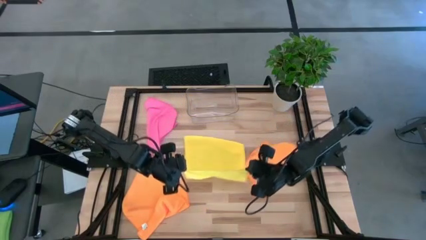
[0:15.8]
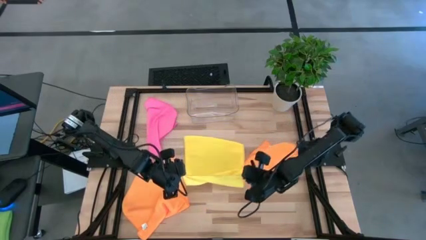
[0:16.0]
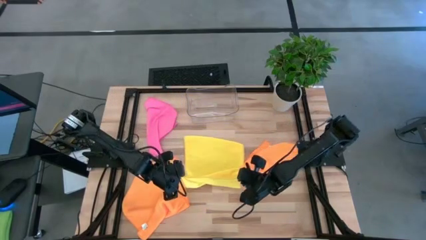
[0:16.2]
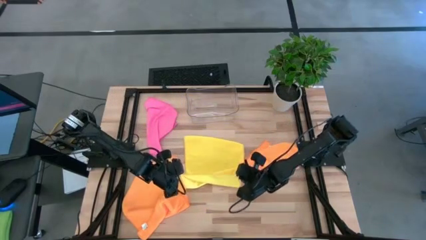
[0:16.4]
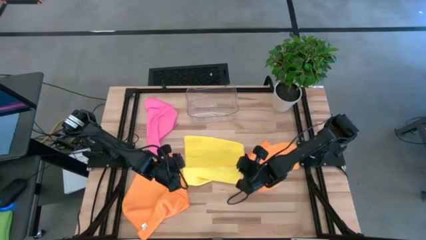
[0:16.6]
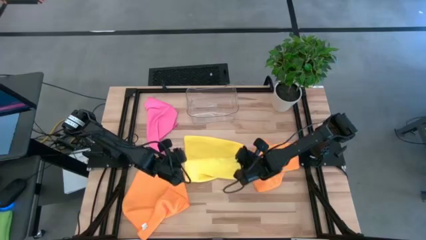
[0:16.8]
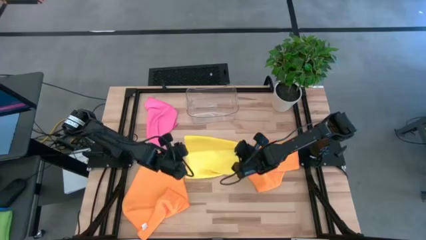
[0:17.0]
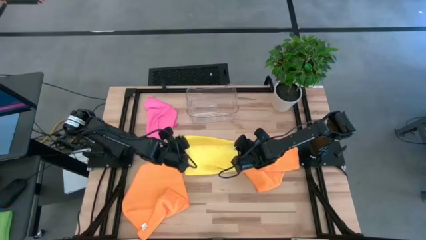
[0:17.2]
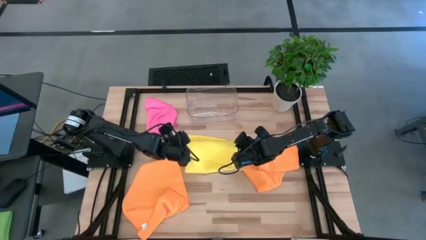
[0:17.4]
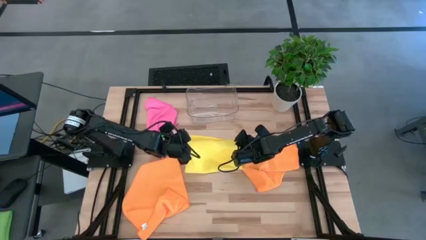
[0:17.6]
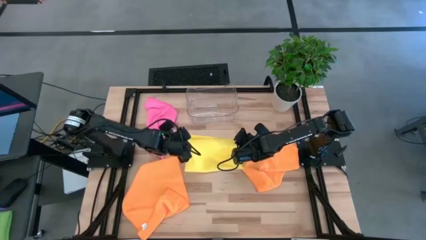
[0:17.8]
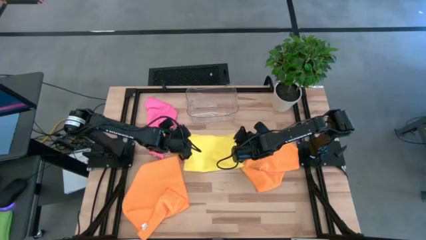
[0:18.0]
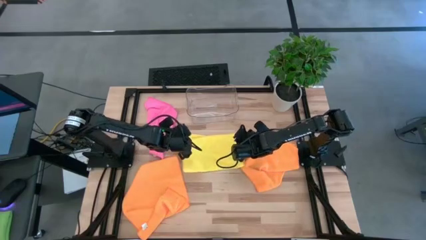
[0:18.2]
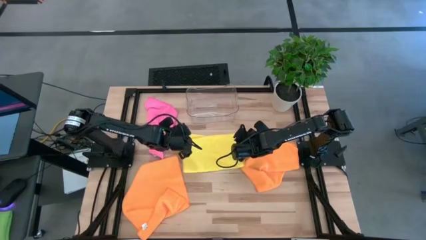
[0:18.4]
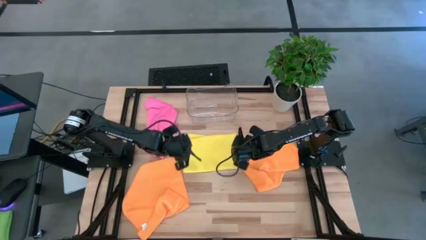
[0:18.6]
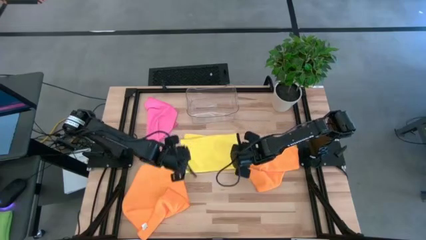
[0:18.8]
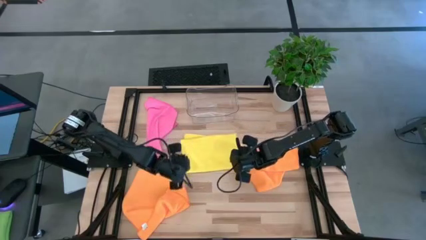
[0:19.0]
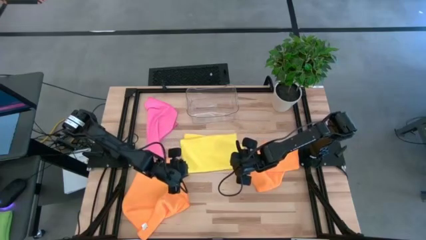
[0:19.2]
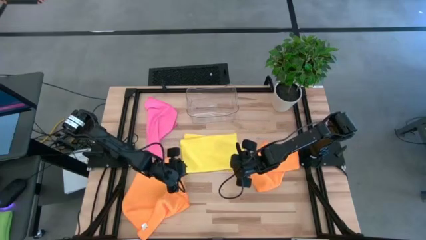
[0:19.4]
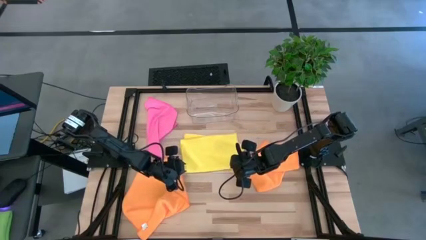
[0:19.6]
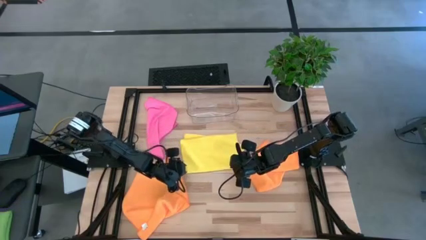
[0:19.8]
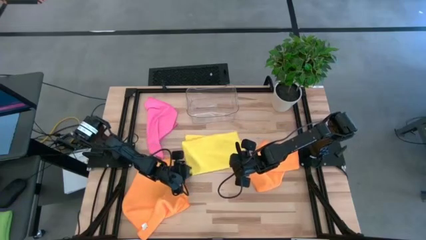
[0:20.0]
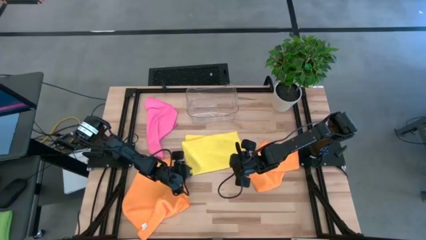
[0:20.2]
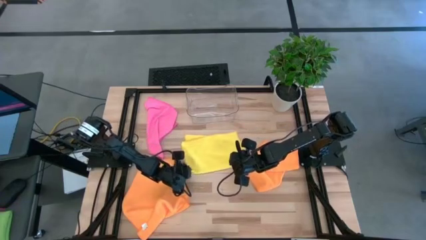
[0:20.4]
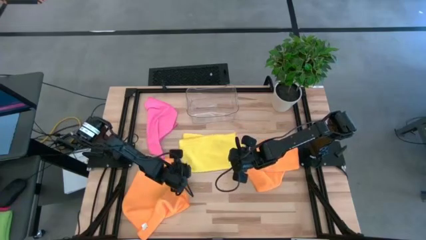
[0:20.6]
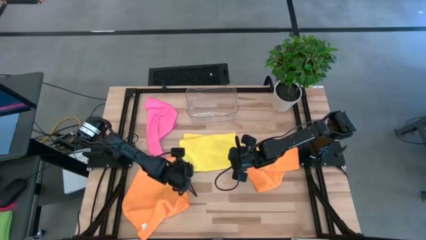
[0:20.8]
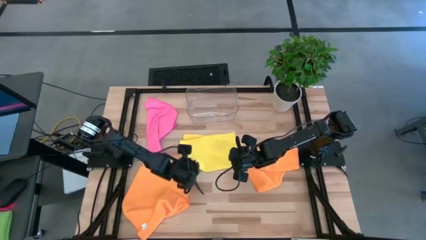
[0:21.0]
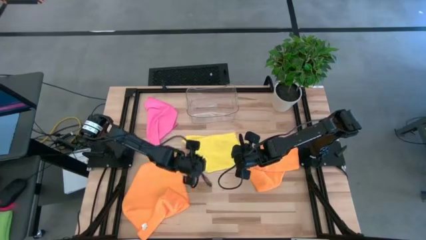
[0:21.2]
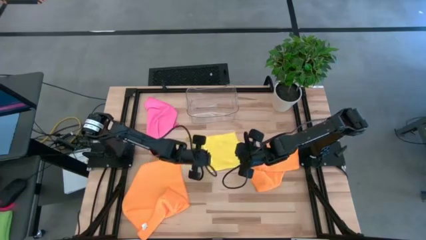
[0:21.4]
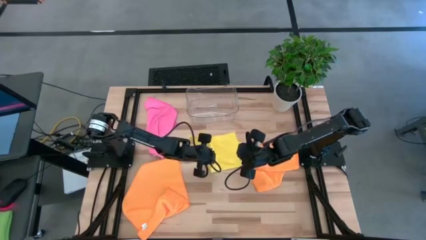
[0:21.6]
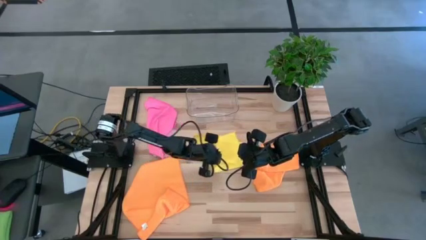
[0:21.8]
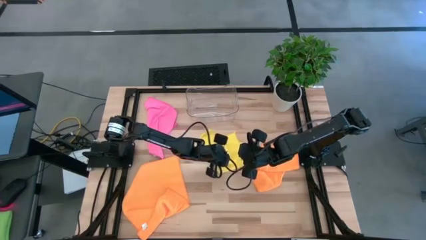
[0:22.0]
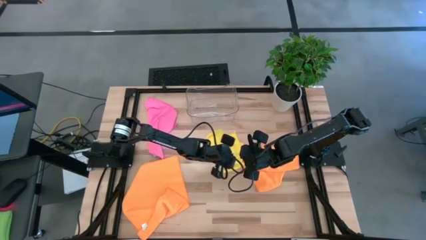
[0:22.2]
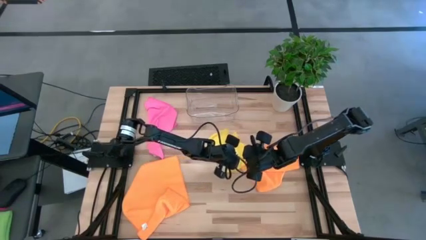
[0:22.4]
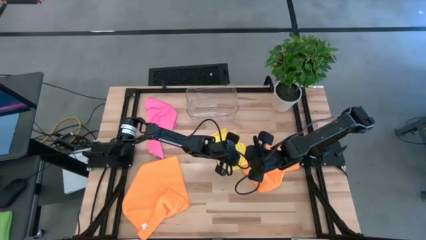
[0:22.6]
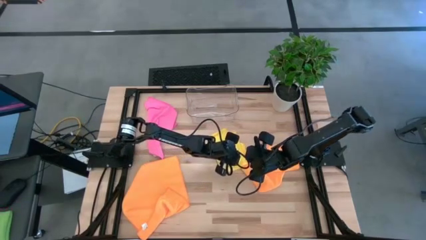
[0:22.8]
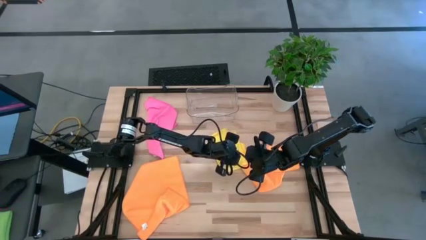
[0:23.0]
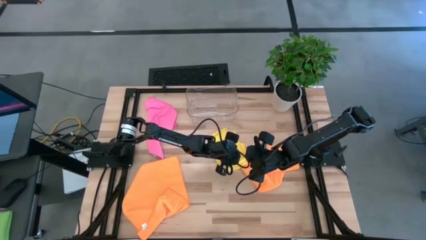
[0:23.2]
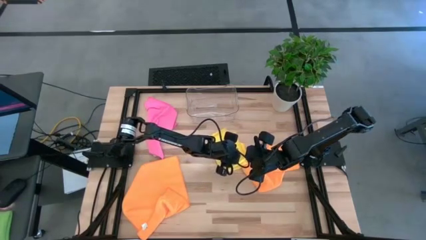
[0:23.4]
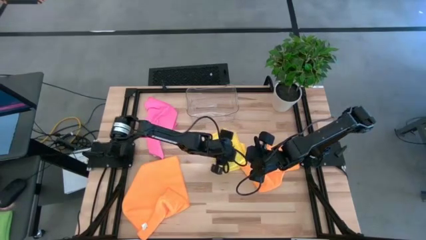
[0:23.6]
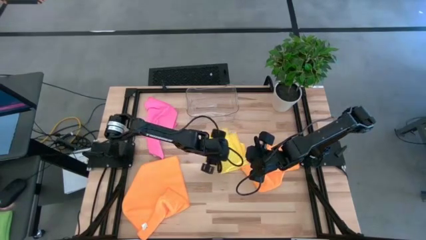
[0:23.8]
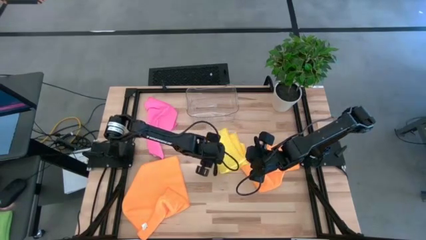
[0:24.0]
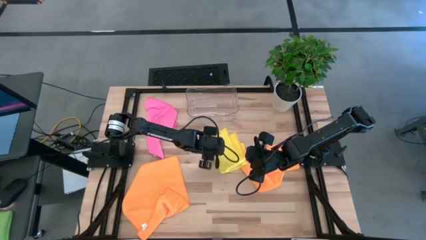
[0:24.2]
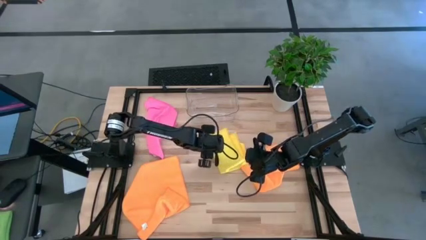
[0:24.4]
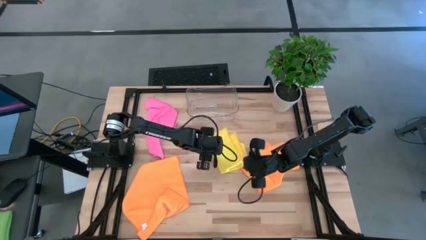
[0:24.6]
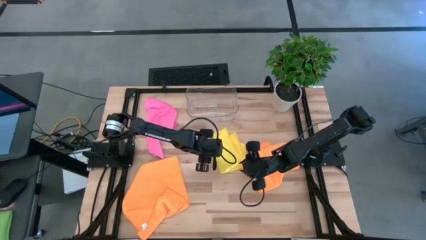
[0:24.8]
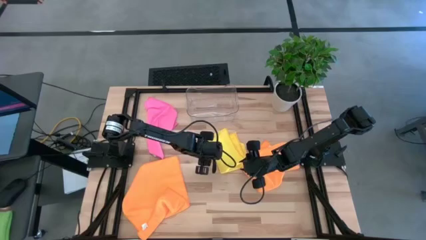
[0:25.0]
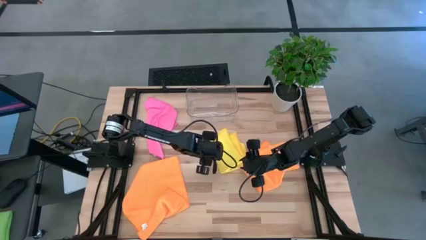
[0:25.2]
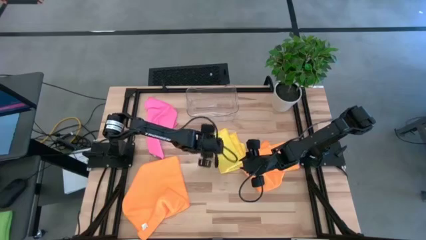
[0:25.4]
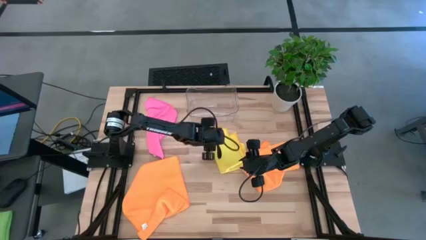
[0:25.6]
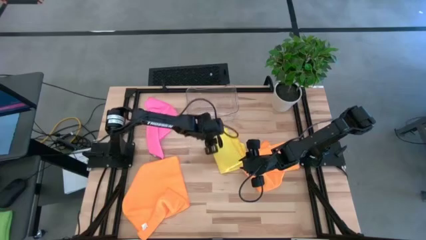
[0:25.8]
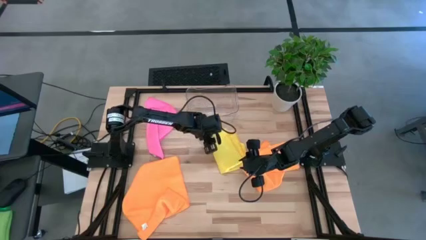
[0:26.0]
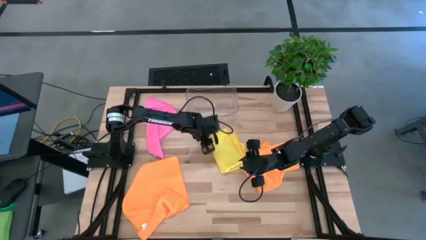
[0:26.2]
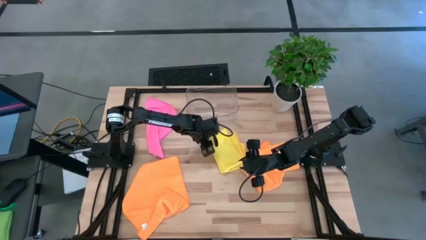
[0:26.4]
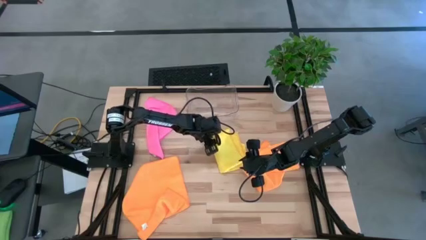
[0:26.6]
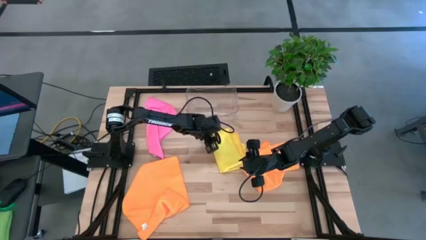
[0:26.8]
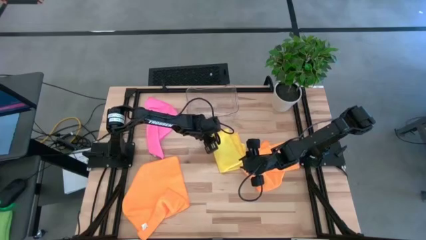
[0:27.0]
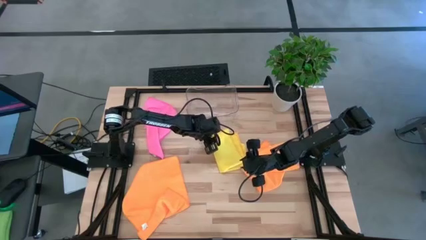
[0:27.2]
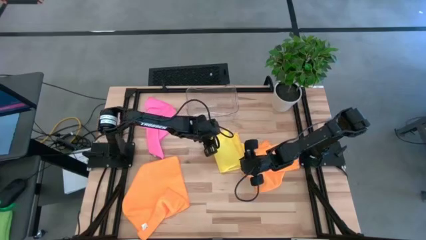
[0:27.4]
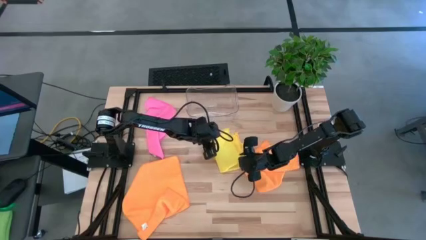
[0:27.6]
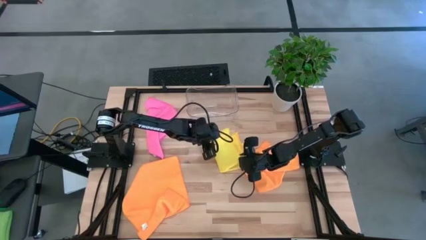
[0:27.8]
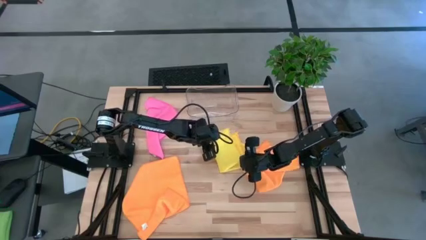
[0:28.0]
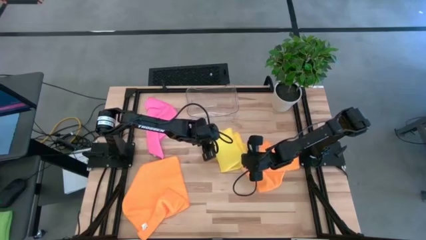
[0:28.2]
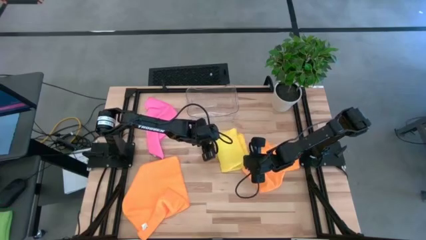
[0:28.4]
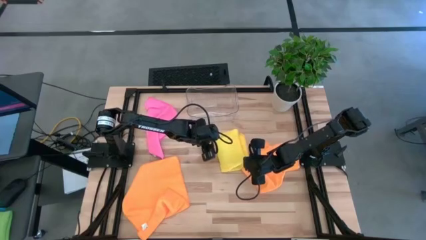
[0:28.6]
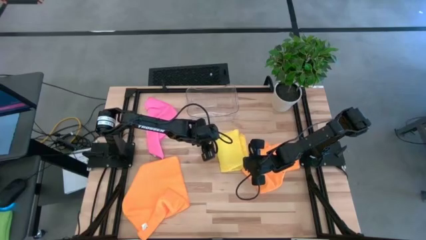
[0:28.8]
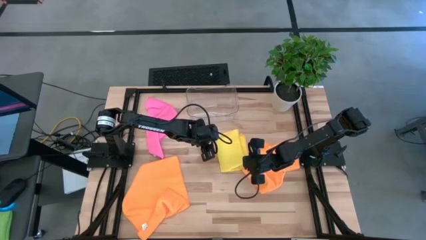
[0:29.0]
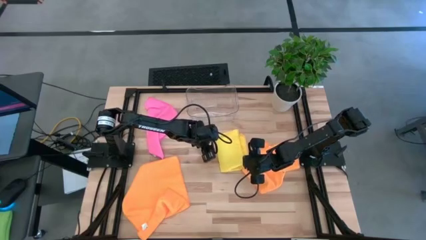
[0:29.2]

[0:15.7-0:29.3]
Task: Fold microfiber towels
Fold the yellow towel

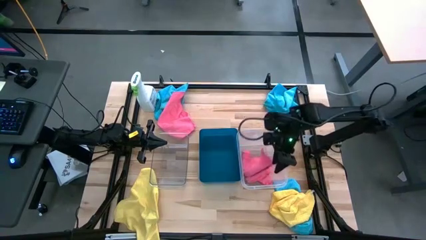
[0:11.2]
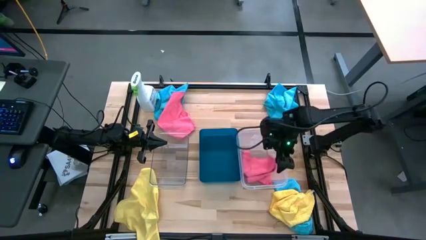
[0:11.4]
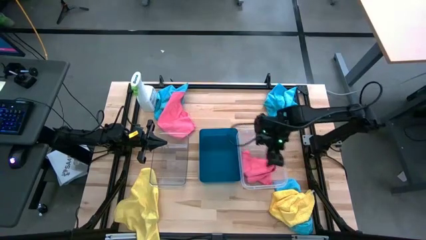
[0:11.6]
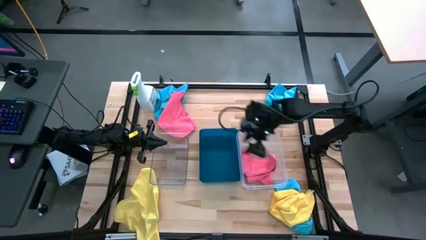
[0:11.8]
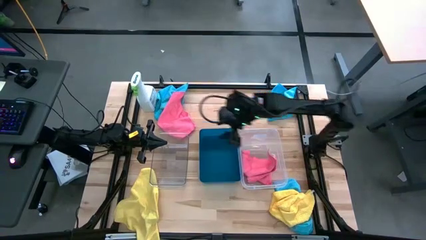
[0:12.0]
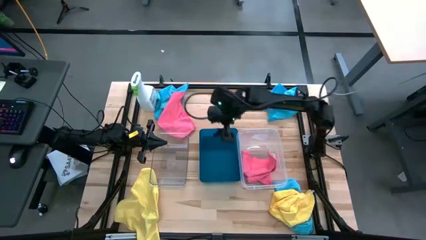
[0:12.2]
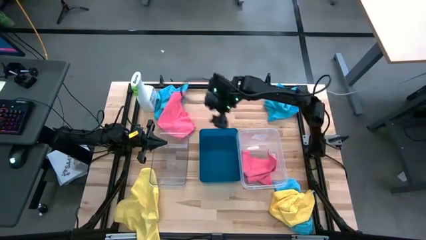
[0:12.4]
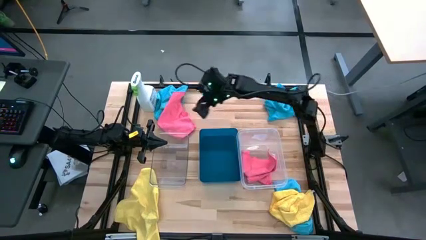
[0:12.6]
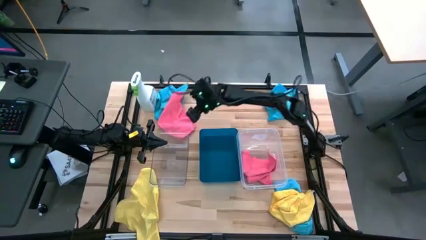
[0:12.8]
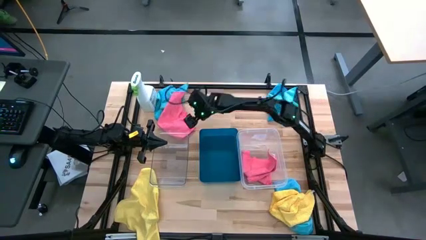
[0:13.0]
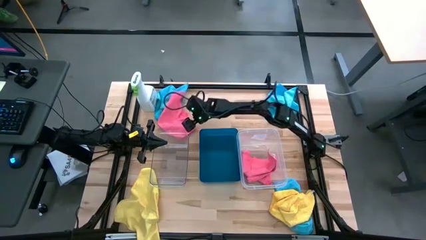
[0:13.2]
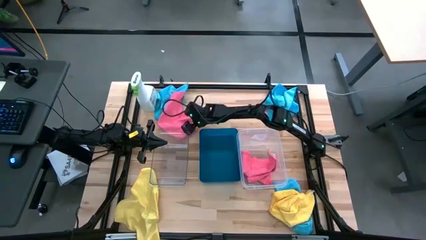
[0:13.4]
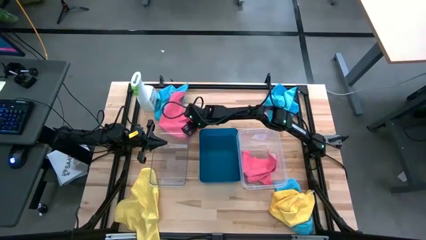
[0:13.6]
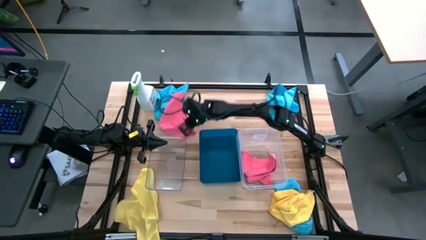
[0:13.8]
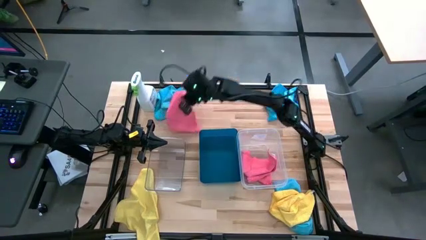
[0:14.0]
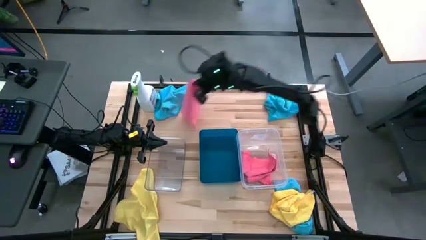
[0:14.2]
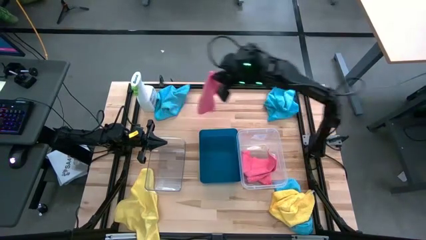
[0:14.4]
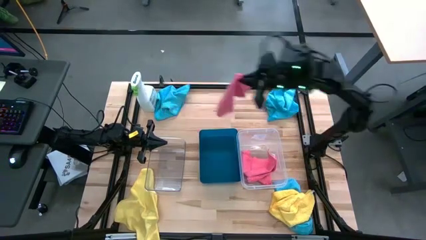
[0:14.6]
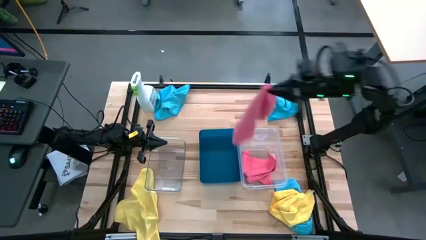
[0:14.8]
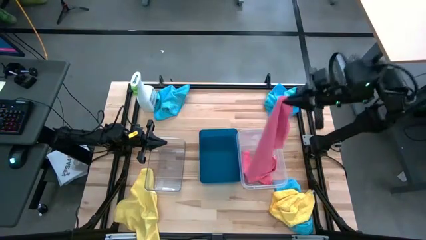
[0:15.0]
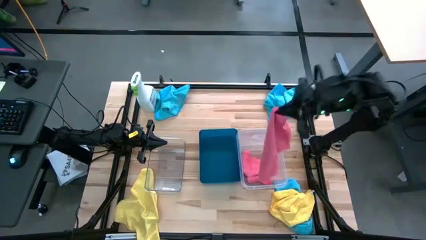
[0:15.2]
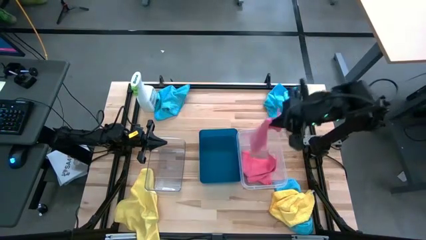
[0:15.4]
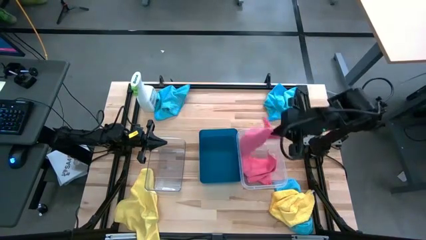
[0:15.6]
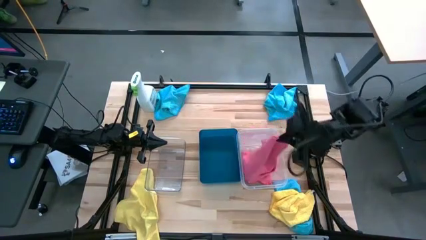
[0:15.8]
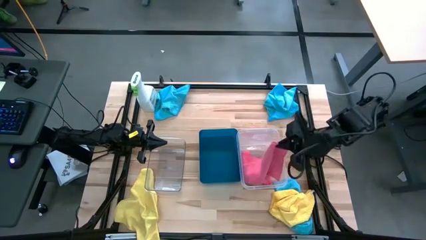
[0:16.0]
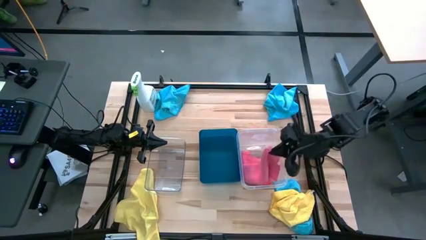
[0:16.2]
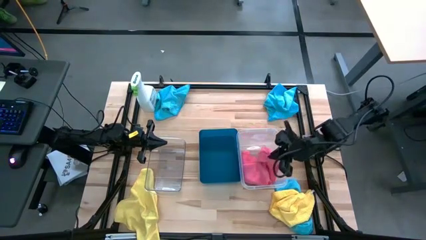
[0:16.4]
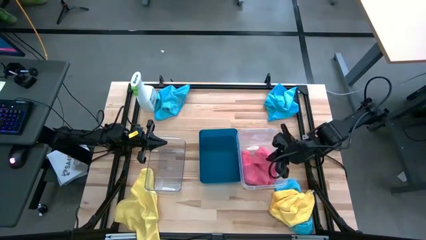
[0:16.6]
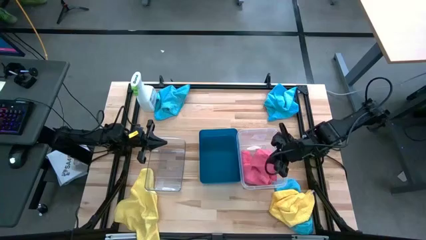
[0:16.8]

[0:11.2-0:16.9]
Task: Sort microfiber towel by color & place in baskets
Put the pink microfiber cloth into the right transparent bin
